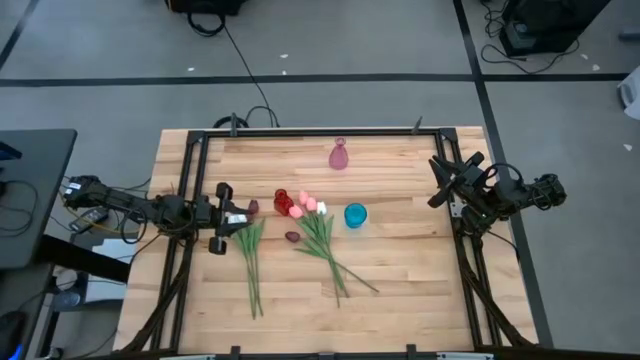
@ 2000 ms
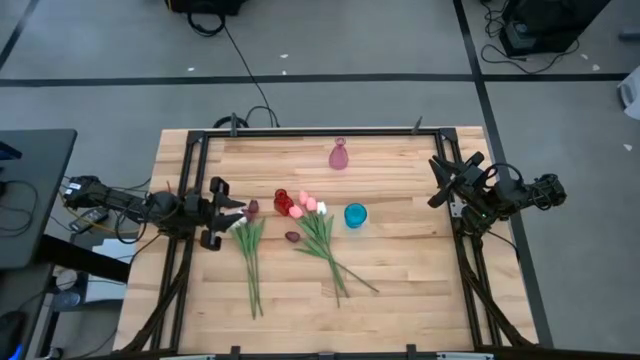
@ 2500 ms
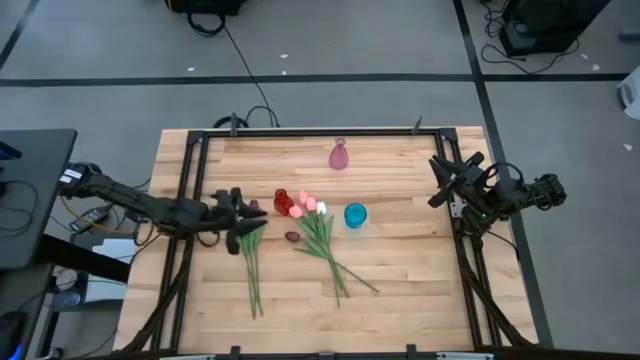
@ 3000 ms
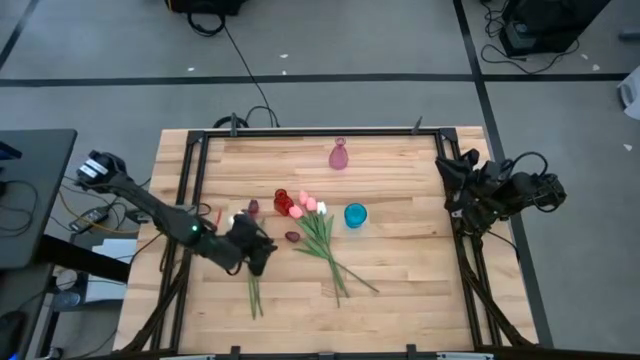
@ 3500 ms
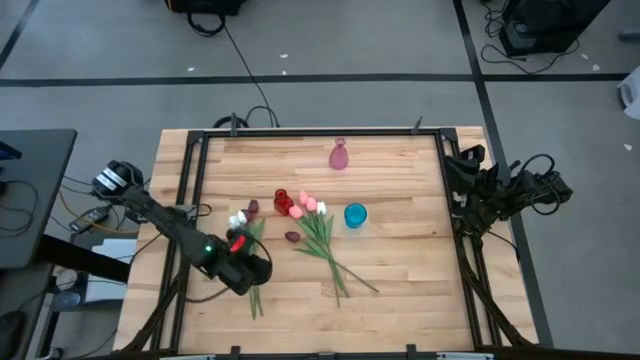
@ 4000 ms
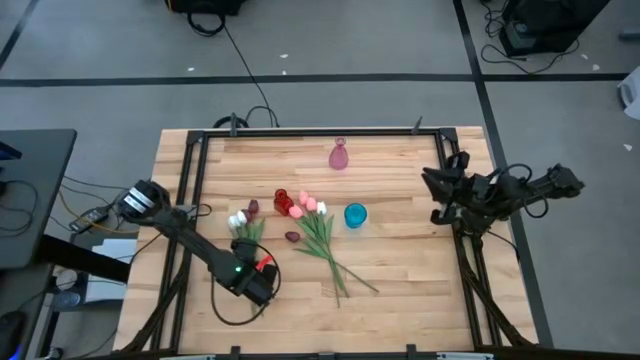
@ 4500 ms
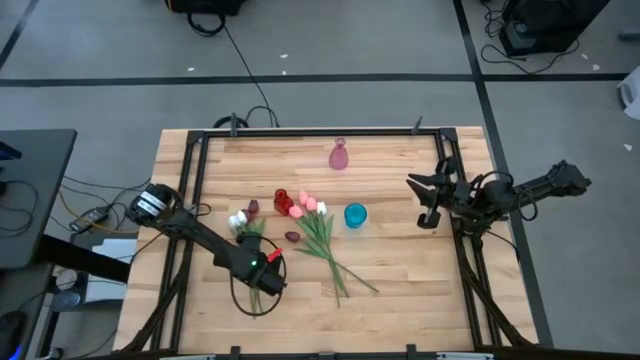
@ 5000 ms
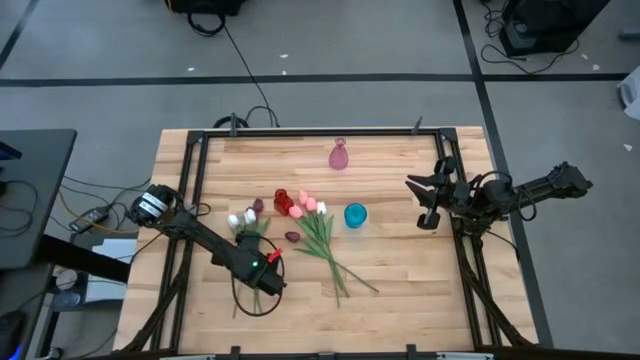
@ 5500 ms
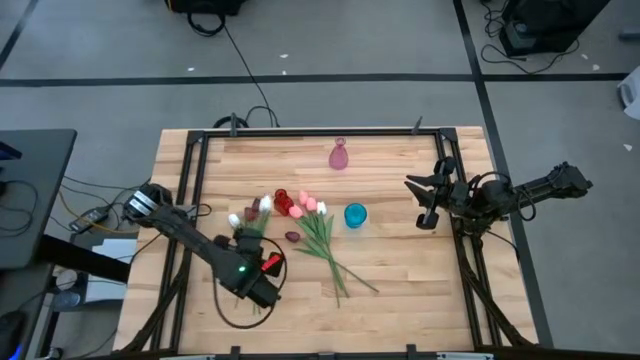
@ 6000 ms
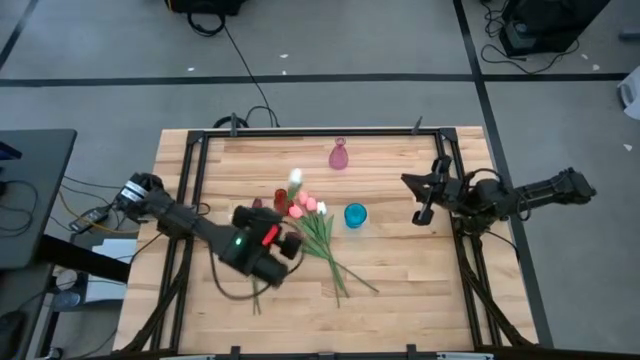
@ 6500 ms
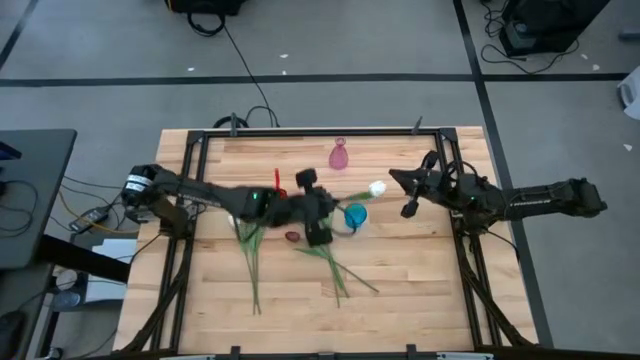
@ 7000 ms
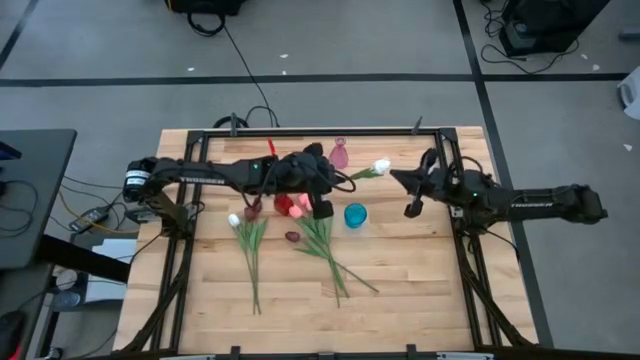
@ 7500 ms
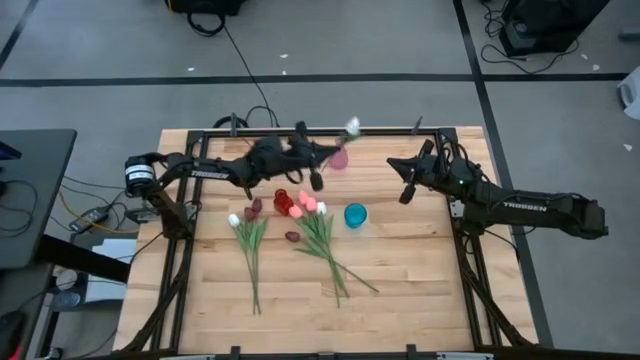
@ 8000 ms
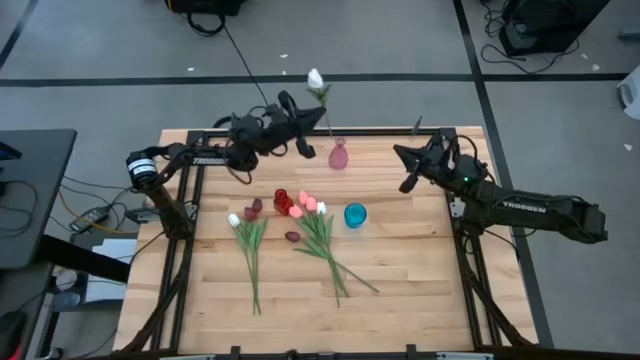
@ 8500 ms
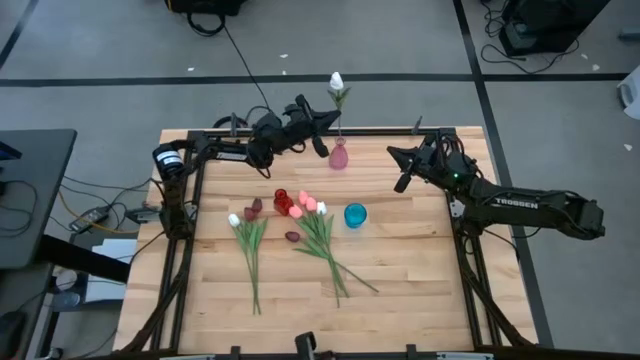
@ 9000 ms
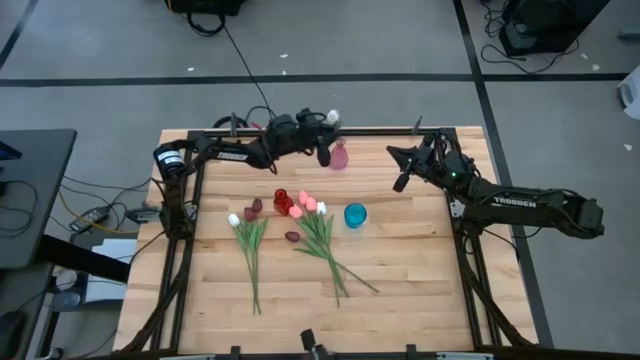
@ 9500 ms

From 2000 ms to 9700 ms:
Task: Sort flowers into vase by color
Put the white tulip into the pink vase

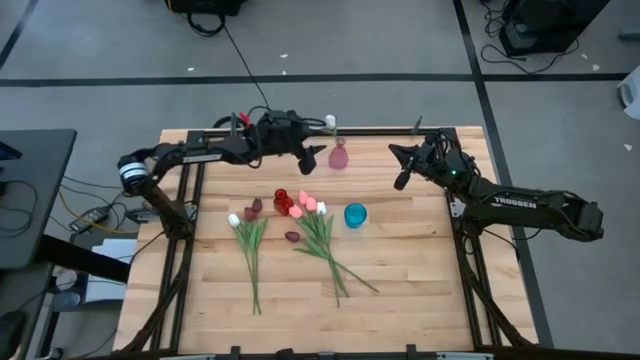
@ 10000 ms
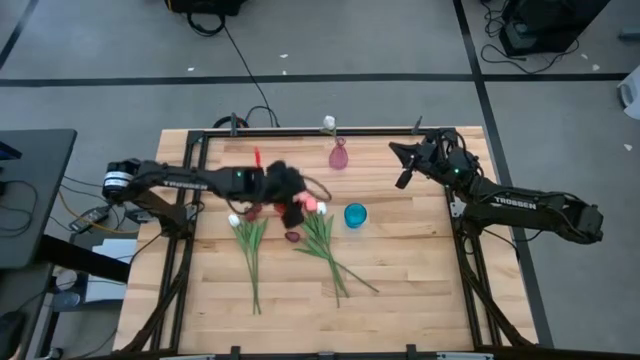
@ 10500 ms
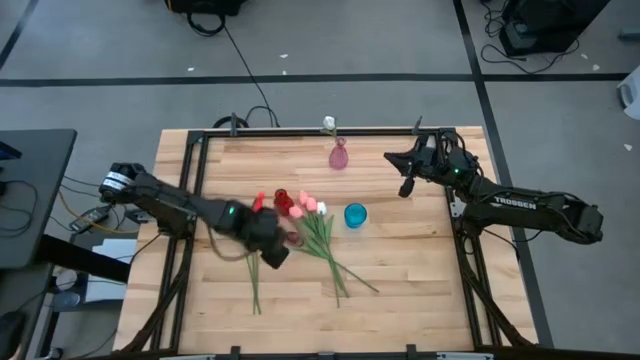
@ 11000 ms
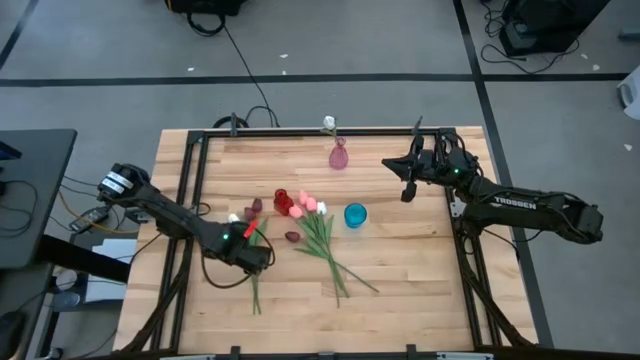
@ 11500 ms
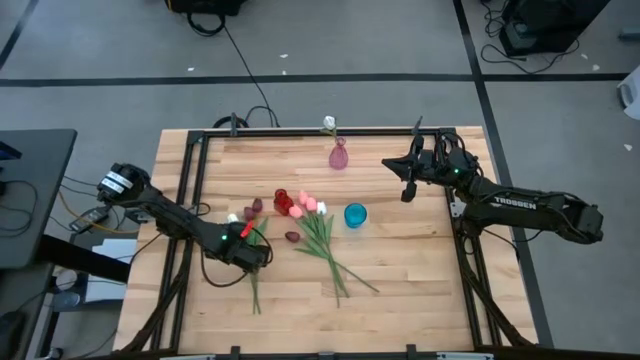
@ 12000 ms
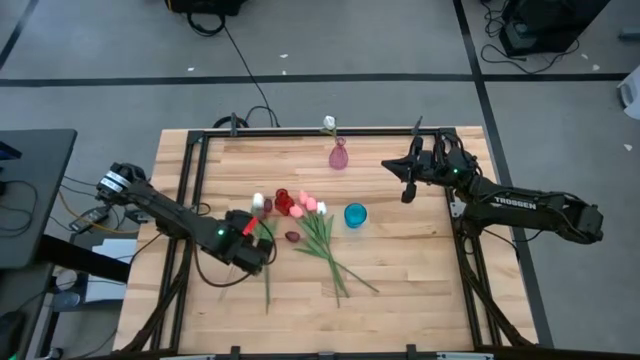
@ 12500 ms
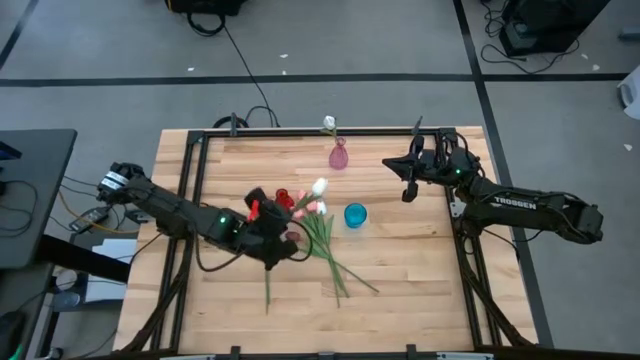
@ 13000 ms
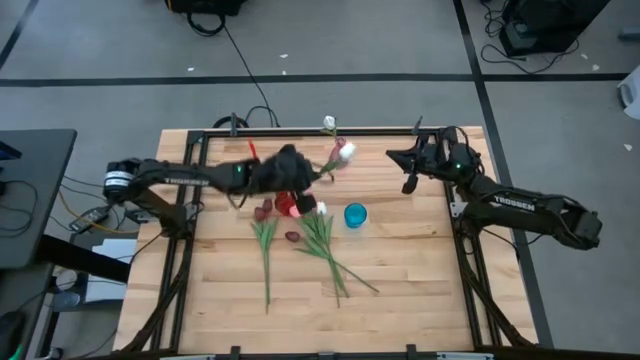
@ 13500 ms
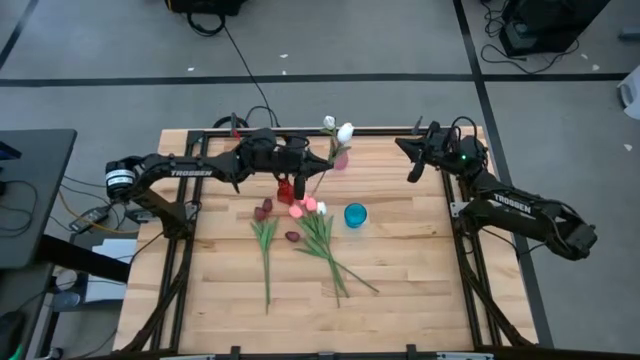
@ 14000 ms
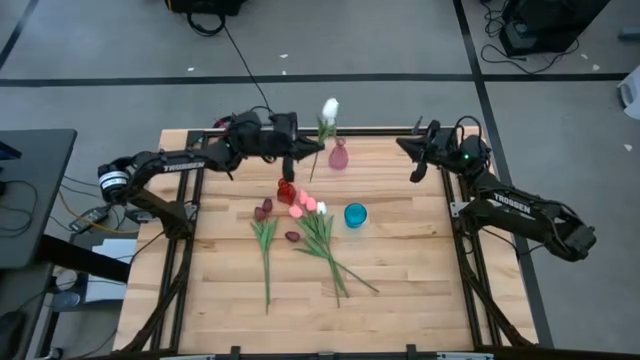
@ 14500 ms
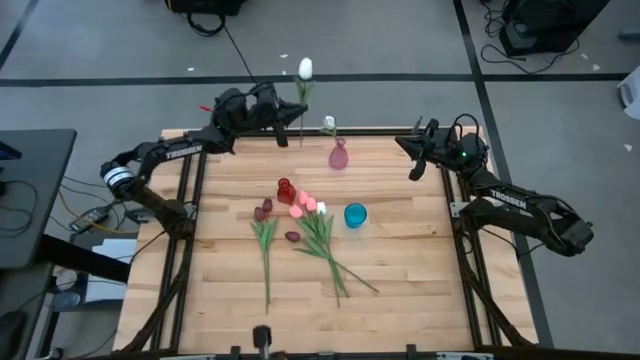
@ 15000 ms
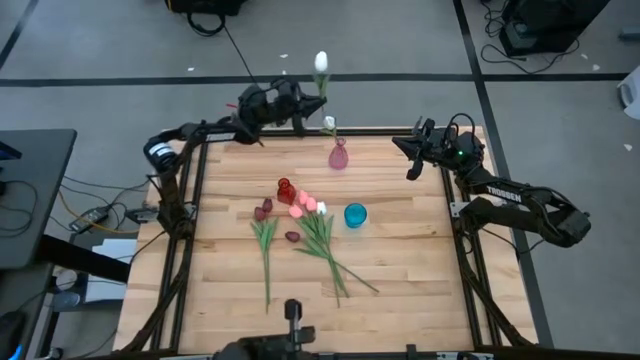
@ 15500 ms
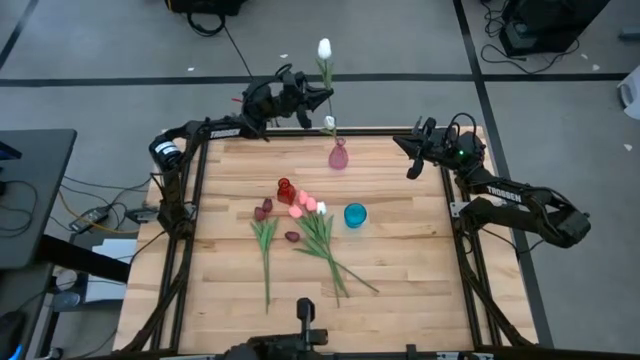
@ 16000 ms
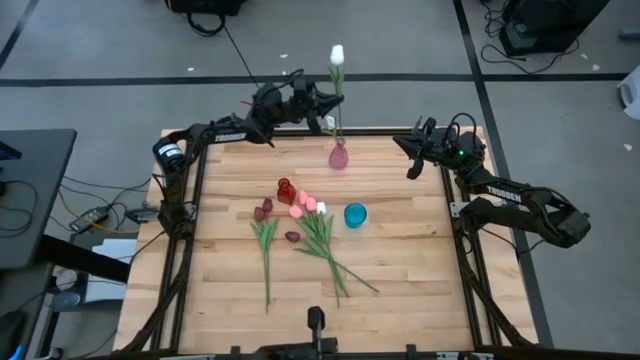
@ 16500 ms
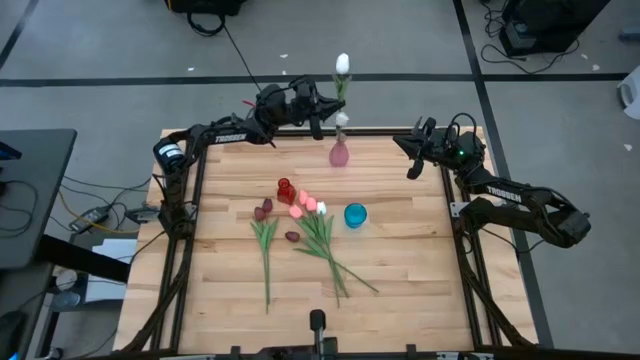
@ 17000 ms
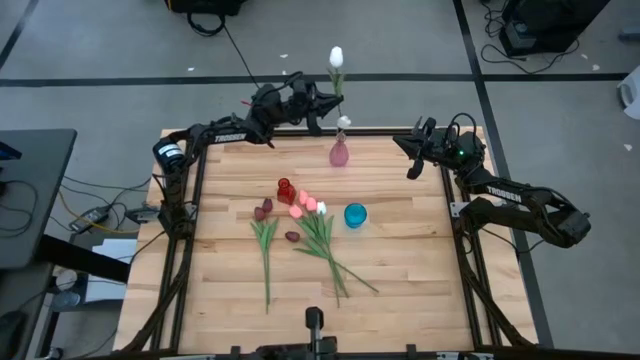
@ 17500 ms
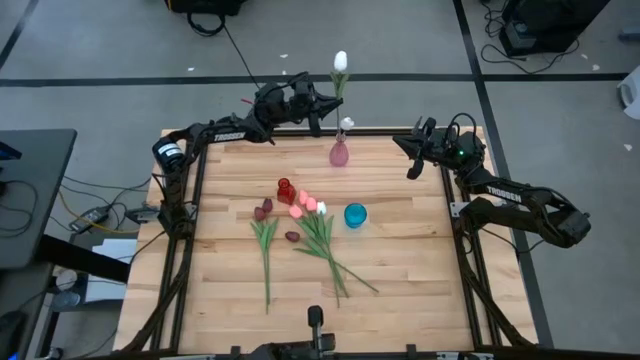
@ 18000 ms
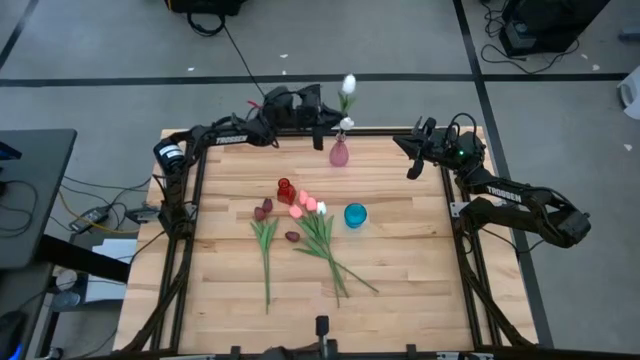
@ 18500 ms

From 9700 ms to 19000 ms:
Put the white tulip into the pink vase

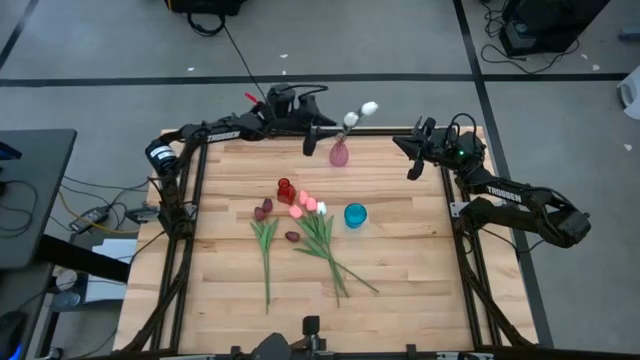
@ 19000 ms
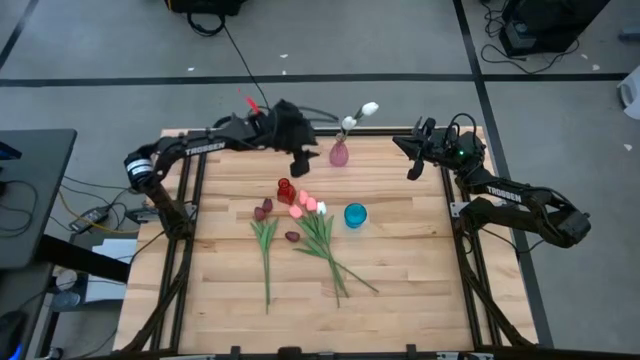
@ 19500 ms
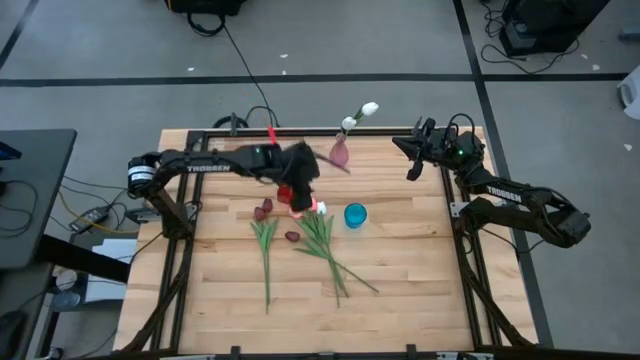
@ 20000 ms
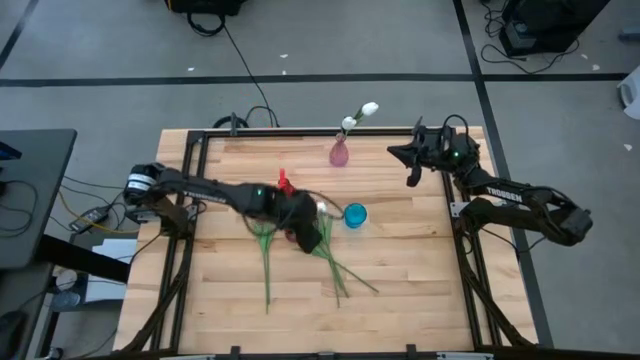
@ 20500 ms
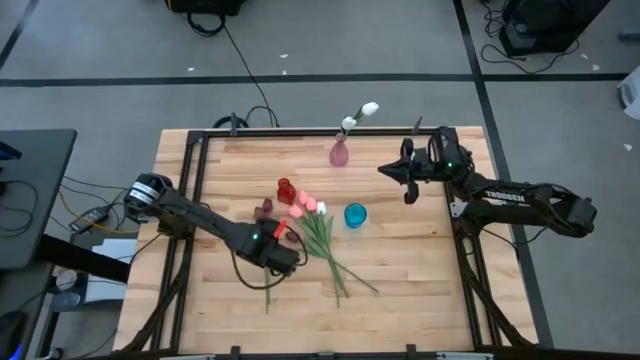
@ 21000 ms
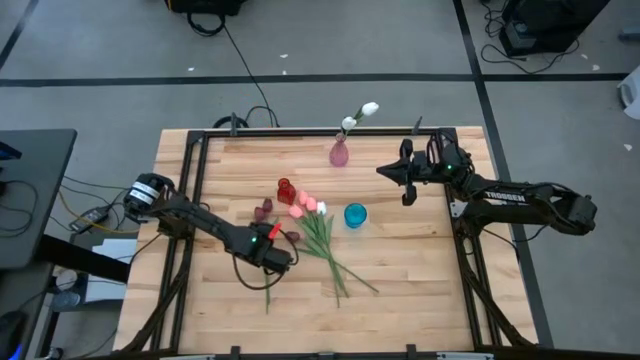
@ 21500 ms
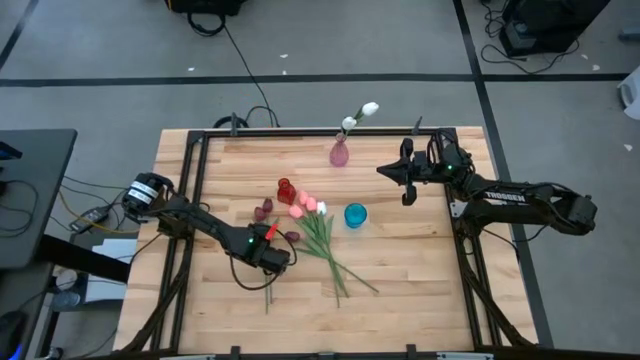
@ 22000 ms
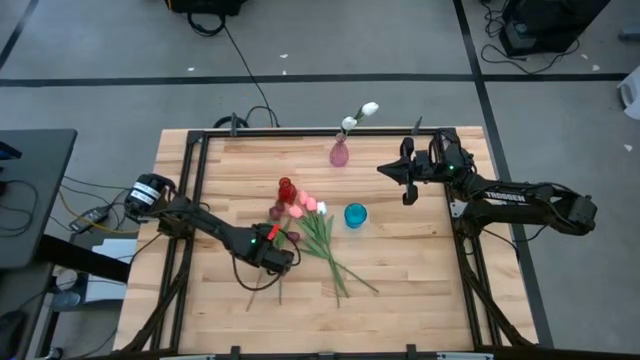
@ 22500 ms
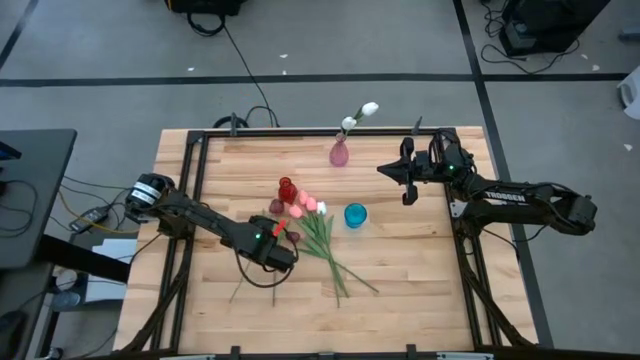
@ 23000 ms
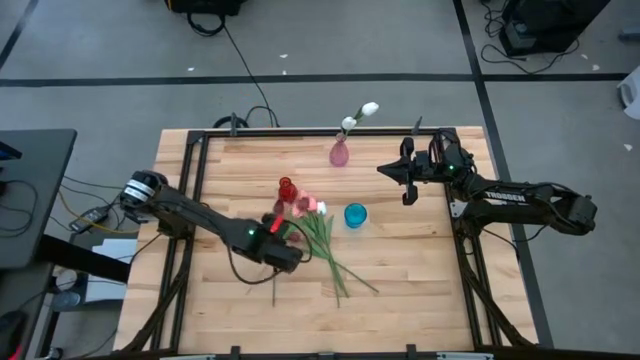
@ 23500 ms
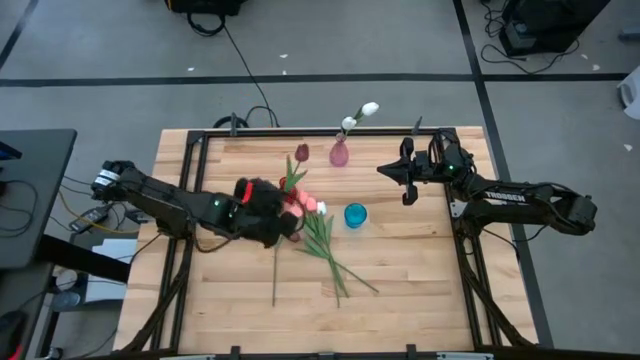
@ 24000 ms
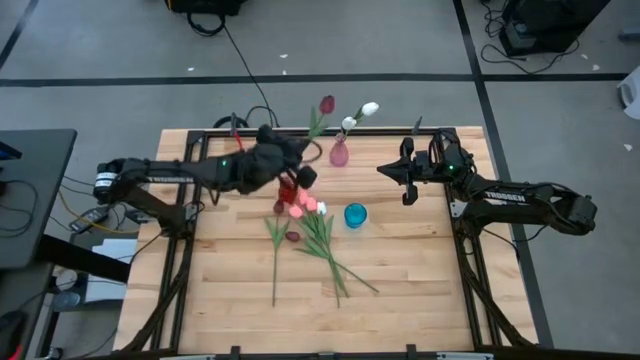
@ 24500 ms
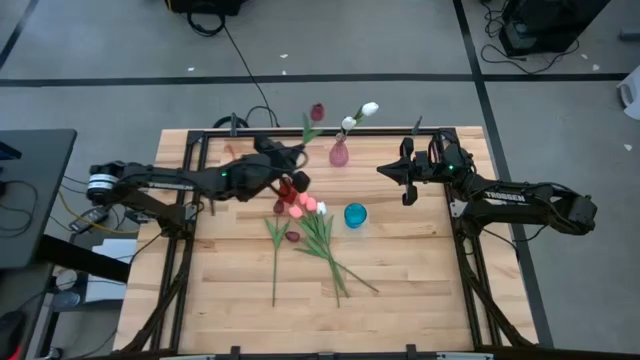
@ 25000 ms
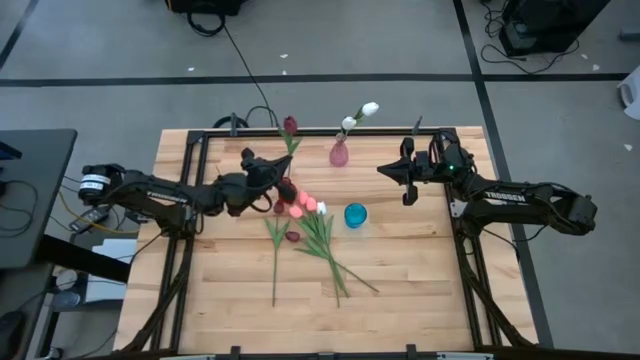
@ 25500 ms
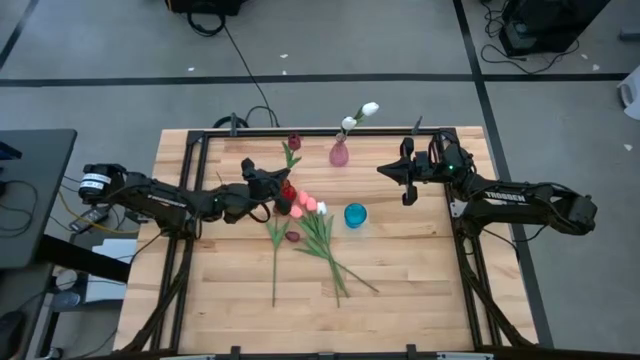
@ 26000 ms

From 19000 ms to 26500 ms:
Put the red tulip into the red vase
